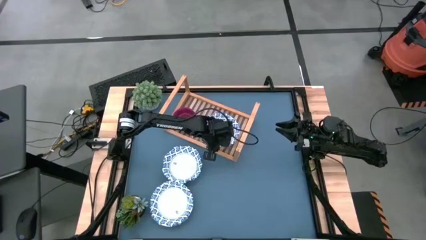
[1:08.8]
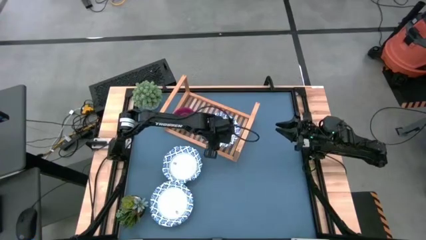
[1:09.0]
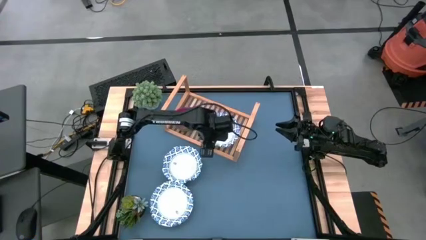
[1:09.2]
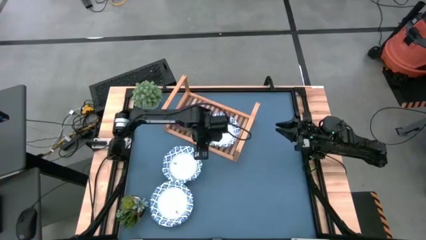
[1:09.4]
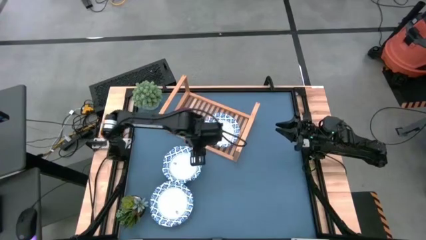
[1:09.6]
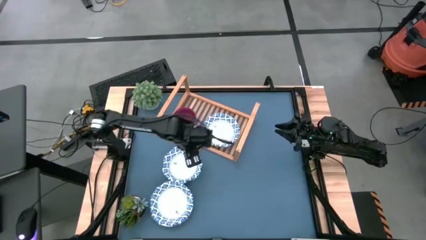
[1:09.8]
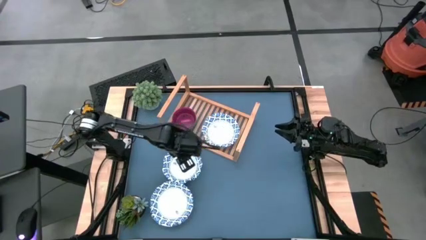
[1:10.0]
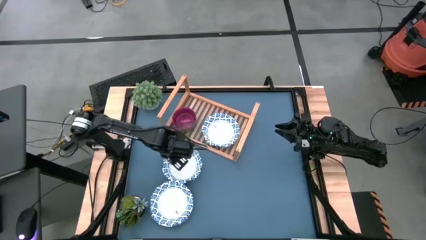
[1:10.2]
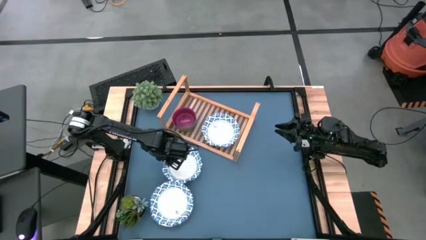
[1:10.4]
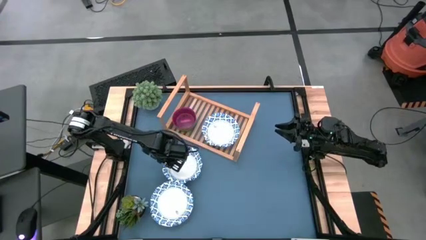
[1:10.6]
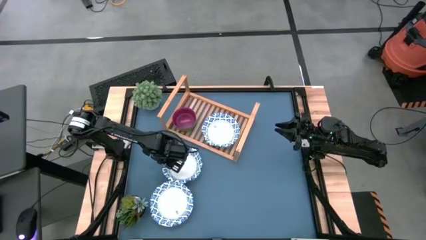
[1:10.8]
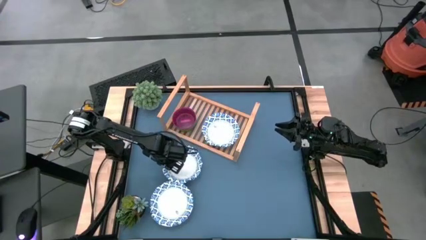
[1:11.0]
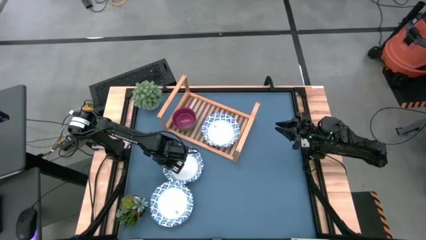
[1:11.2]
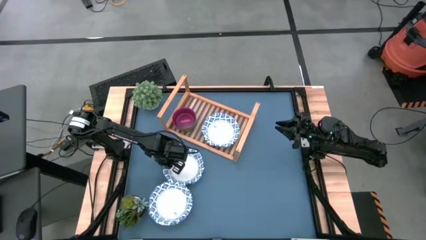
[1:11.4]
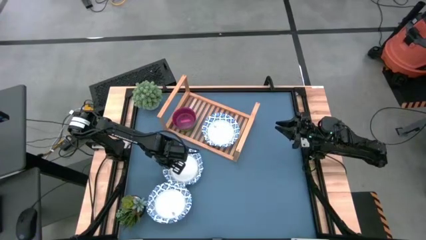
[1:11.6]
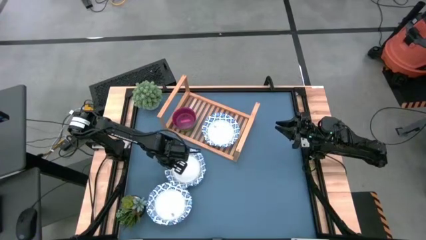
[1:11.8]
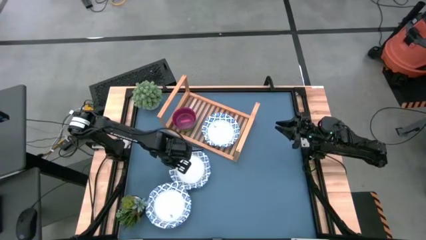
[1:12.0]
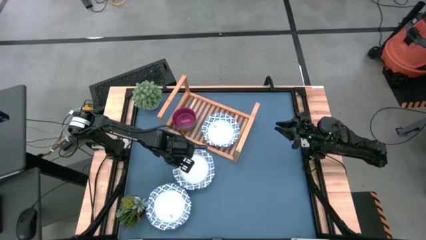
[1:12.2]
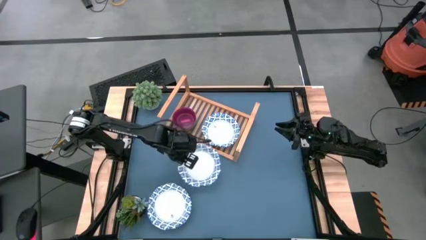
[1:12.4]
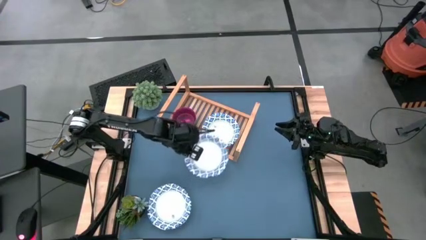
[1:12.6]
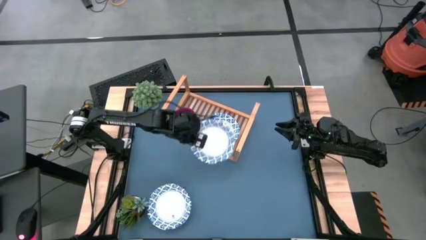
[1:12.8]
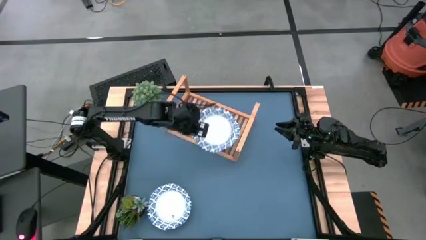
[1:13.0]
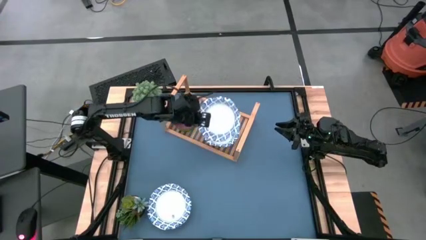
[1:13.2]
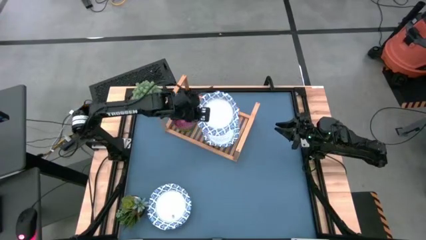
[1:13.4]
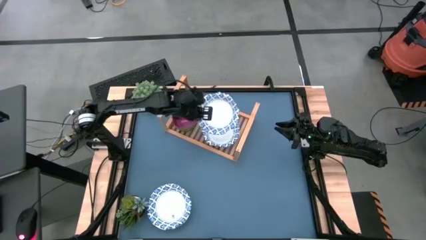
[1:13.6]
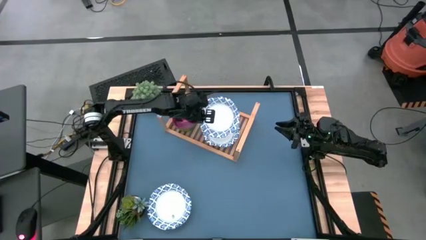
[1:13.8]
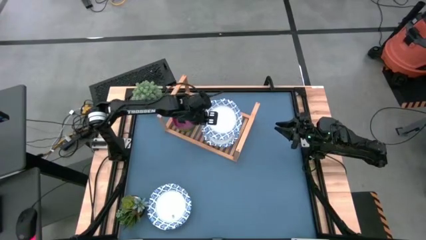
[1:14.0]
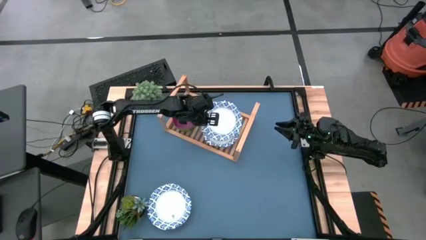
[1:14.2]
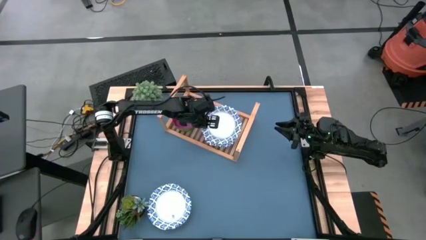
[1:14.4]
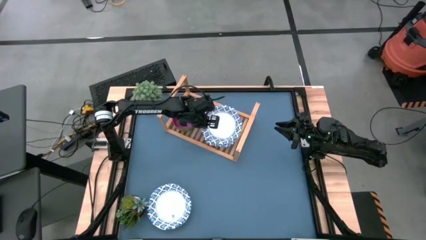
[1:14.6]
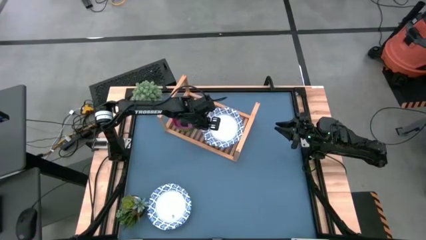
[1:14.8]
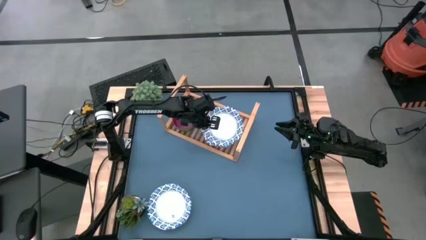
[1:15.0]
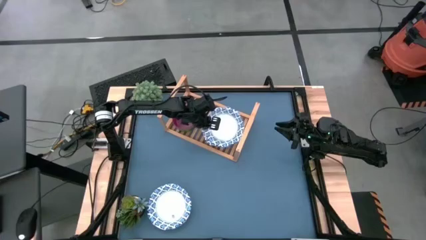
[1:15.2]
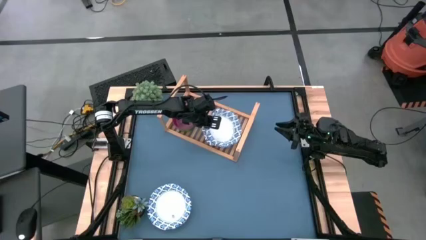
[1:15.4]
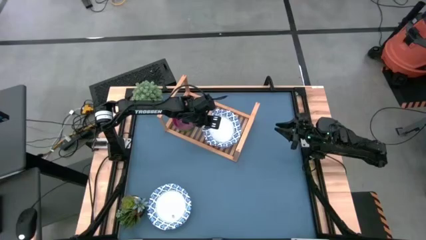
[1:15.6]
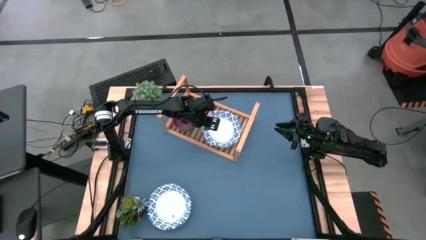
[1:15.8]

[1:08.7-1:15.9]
Task: Place and stack bowls onto a shelf
Stack the large white bowl on the top of the large white bowl on the shelf

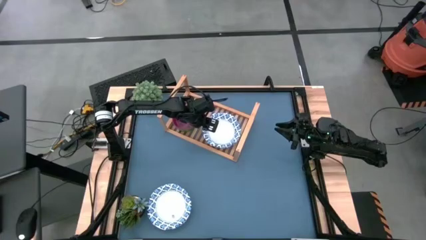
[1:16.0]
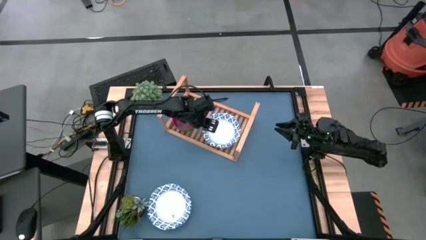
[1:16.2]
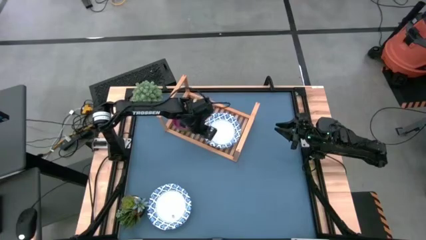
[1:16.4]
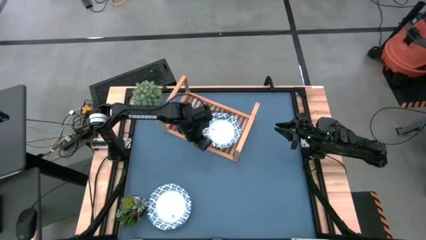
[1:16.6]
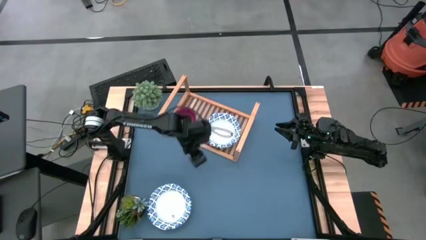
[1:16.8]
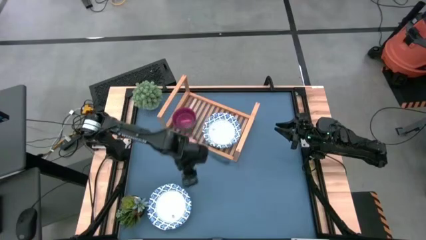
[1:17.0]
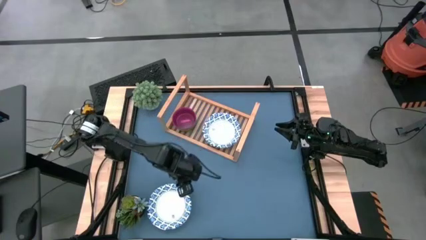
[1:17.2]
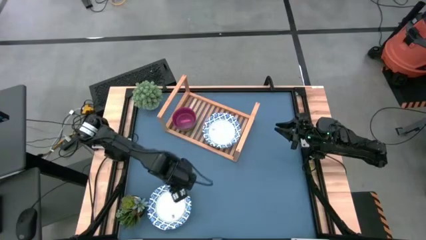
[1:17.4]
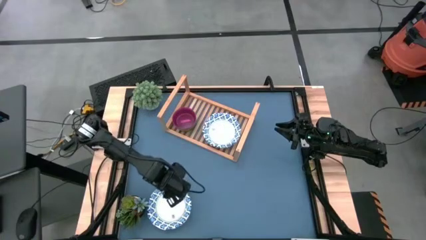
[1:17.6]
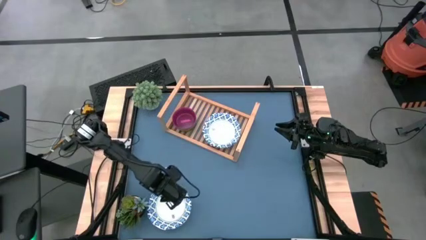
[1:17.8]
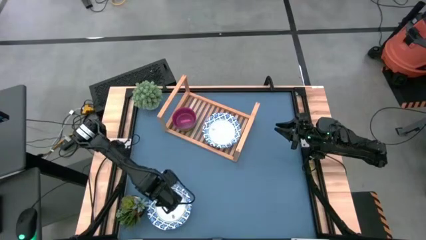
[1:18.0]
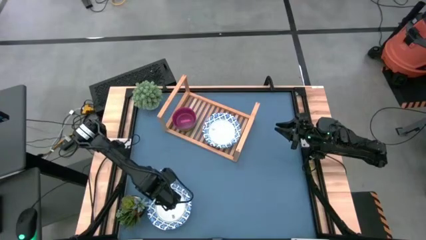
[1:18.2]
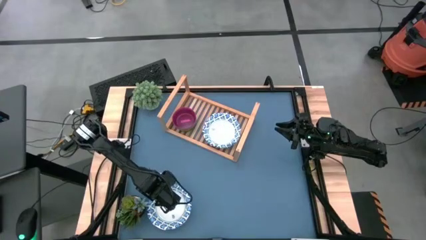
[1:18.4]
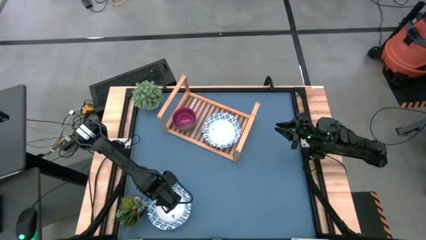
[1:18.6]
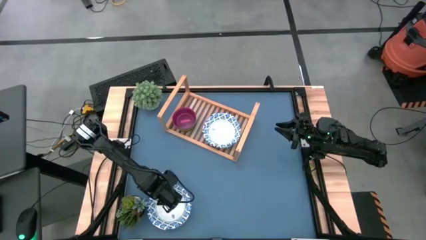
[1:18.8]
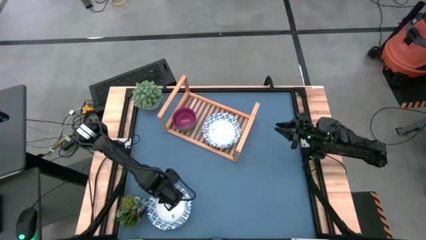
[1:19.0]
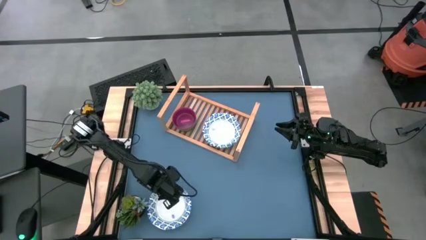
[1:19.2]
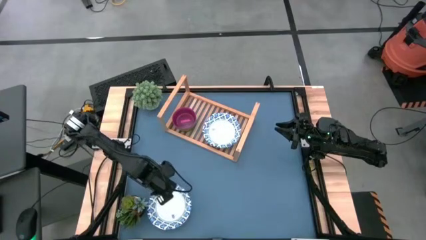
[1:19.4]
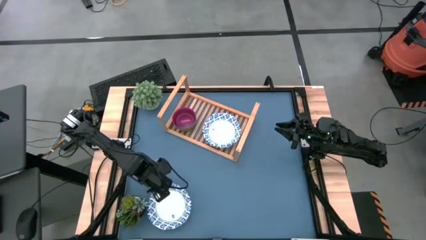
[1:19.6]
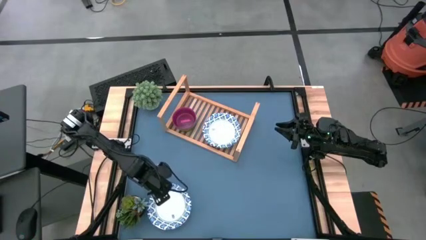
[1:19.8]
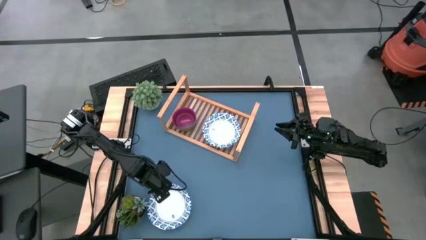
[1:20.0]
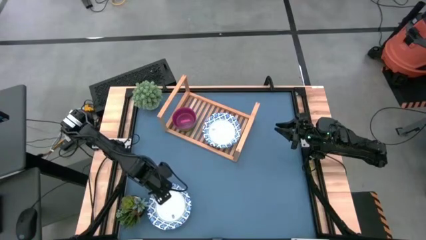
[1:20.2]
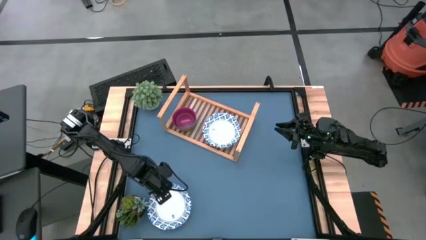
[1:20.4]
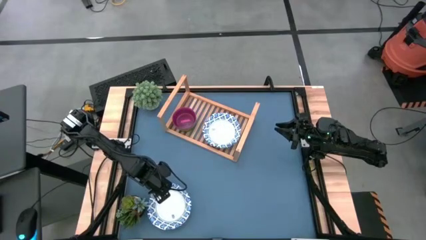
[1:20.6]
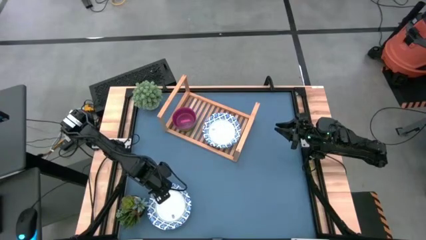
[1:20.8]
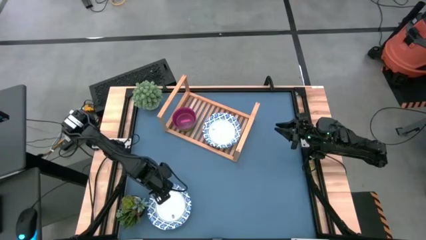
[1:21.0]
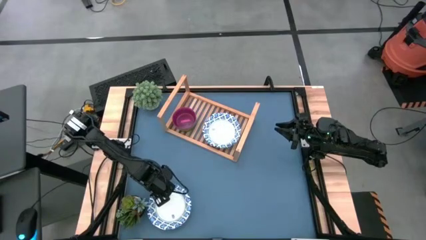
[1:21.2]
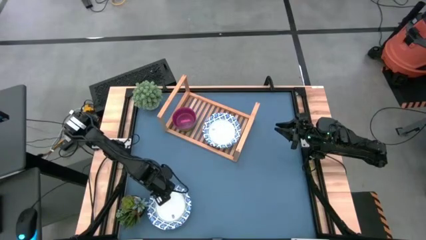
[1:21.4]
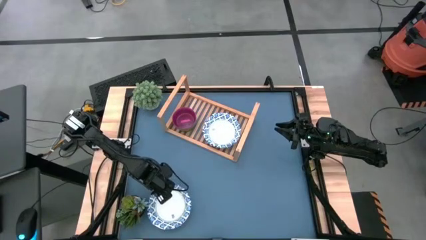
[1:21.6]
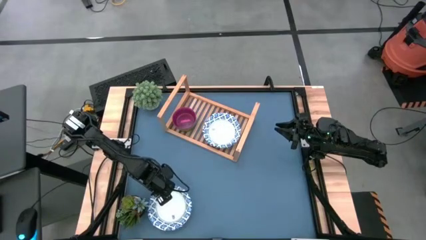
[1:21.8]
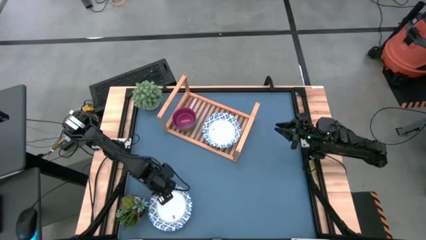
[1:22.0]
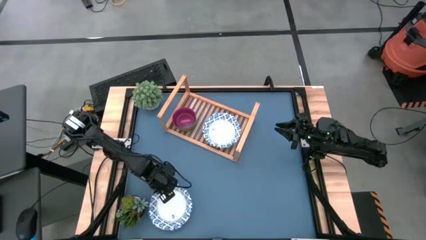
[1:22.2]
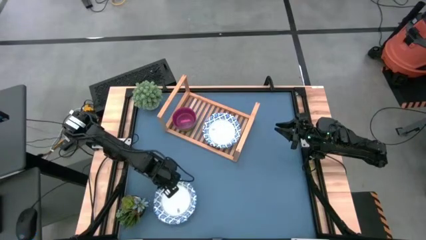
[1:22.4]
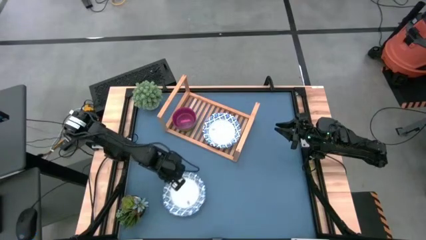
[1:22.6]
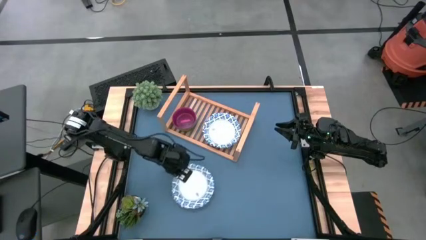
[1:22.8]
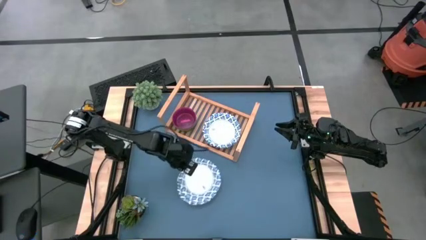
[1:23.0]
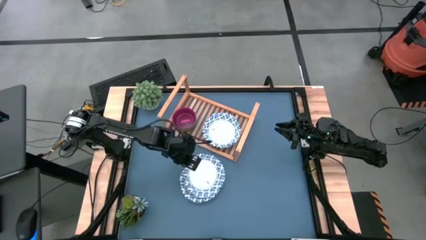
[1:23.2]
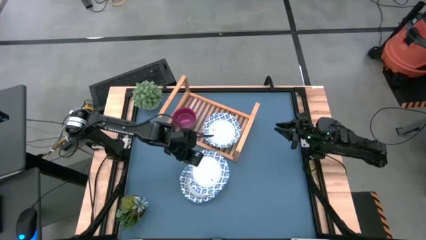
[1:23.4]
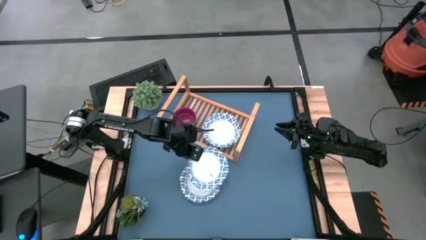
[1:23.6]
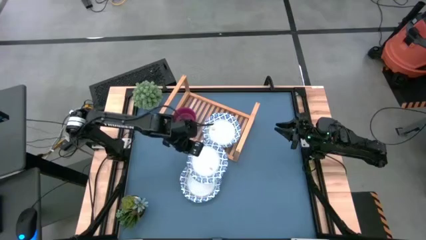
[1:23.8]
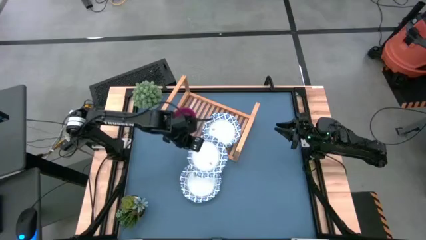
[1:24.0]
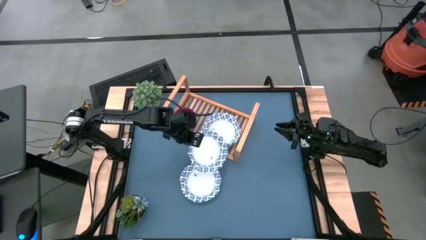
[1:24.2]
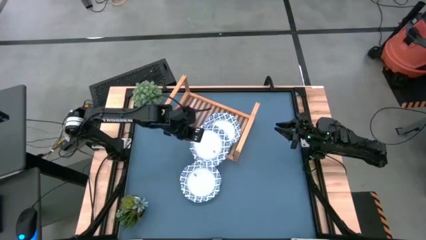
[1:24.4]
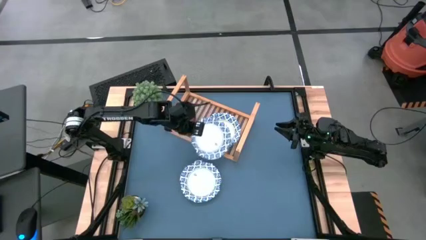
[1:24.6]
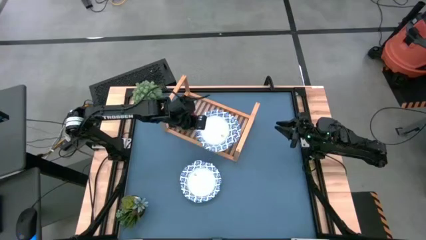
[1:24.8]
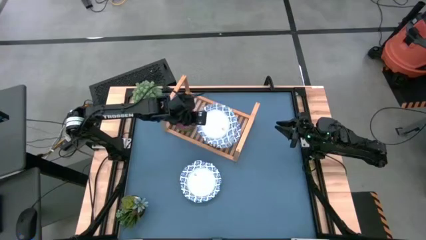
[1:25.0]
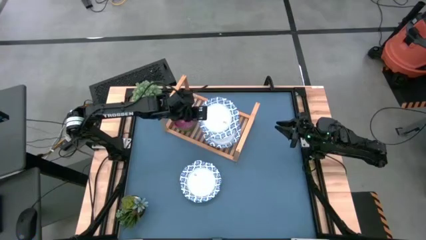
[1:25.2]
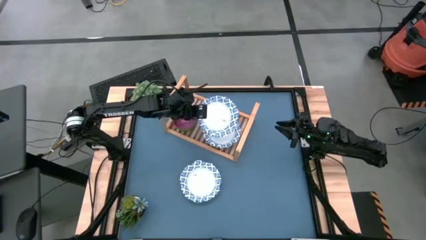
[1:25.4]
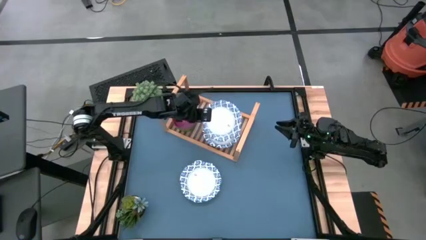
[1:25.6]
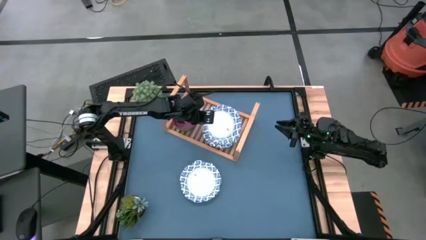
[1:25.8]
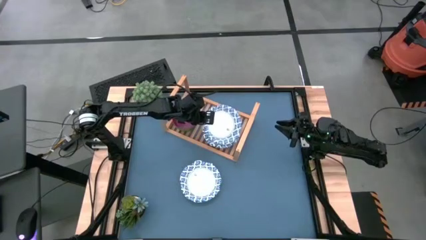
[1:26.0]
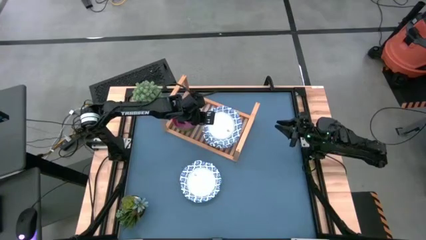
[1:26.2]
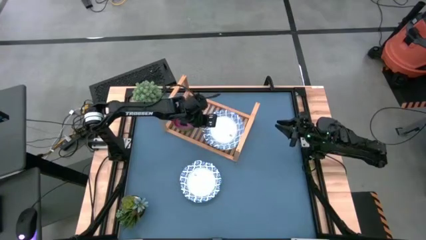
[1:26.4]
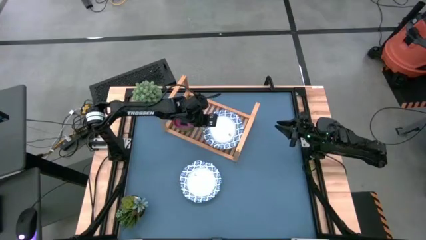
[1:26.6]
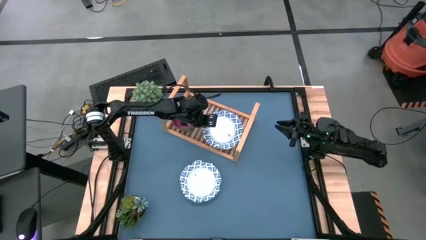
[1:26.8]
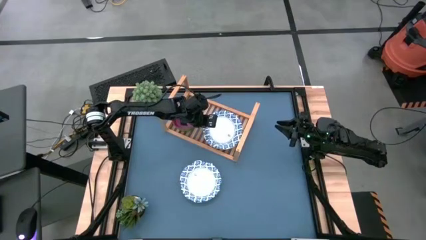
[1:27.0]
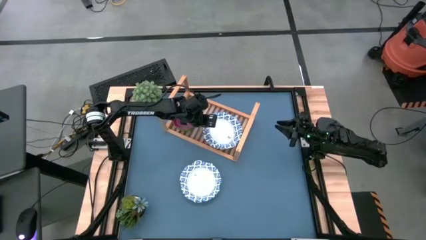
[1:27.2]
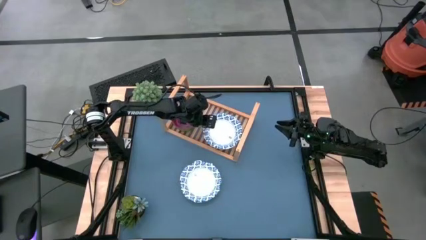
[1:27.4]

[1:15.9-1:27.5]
Stack the large white bowl on top of the large white bowl on the shelf
